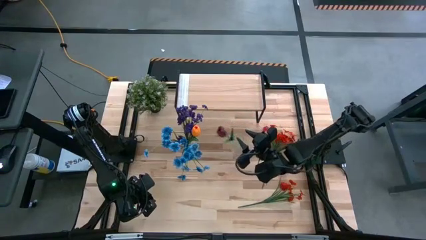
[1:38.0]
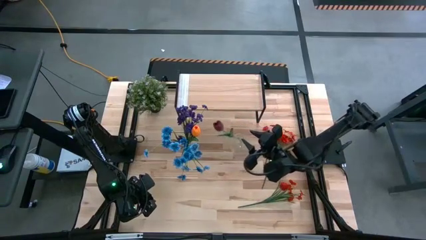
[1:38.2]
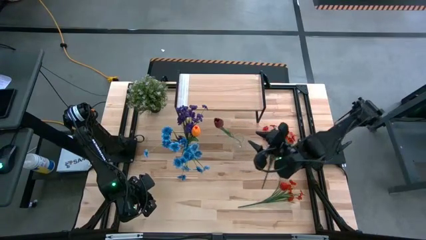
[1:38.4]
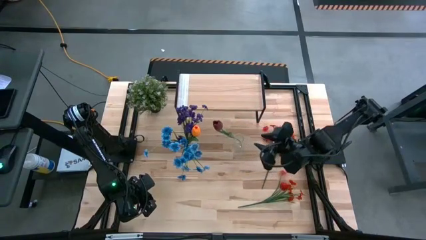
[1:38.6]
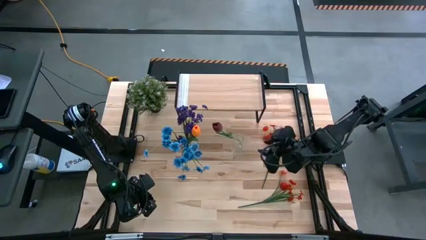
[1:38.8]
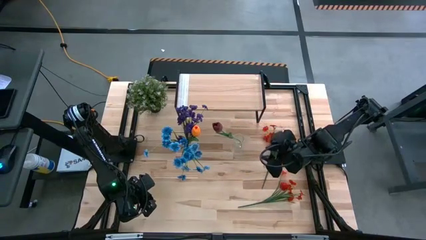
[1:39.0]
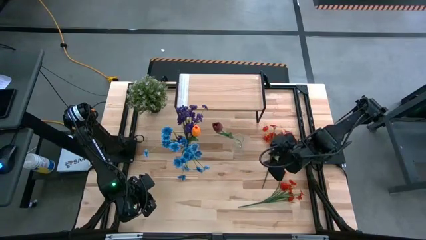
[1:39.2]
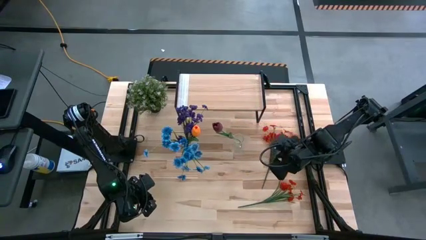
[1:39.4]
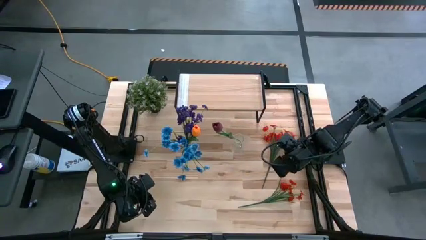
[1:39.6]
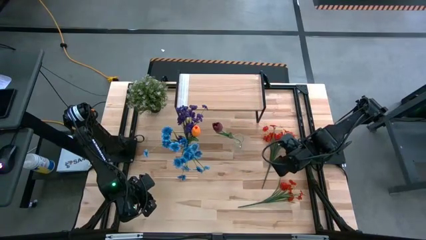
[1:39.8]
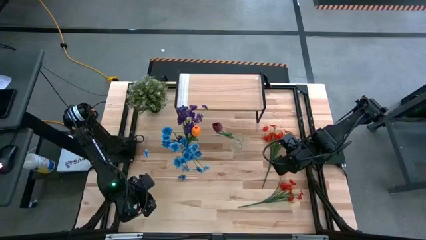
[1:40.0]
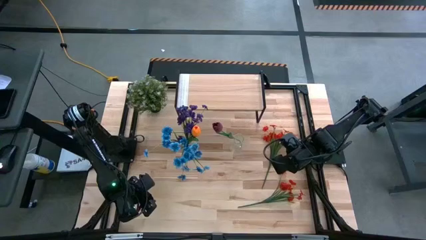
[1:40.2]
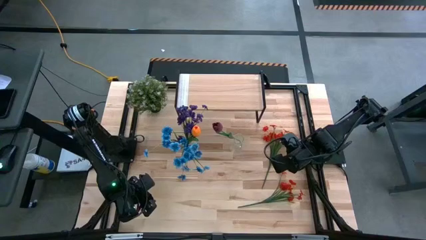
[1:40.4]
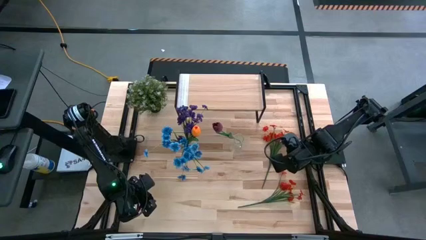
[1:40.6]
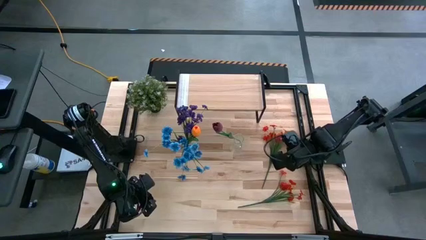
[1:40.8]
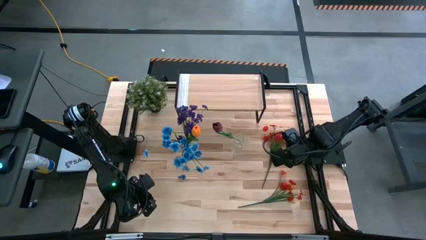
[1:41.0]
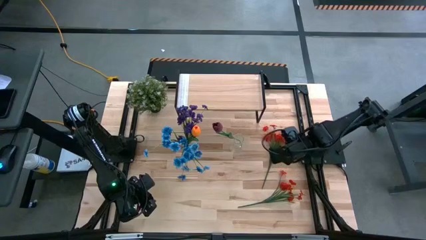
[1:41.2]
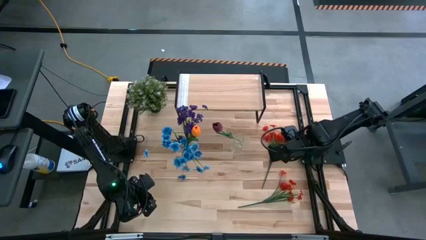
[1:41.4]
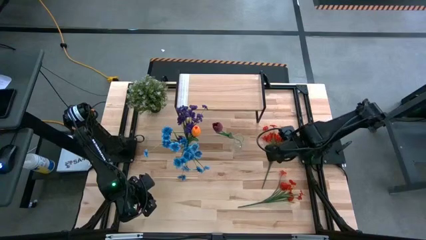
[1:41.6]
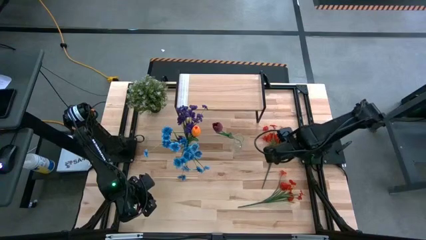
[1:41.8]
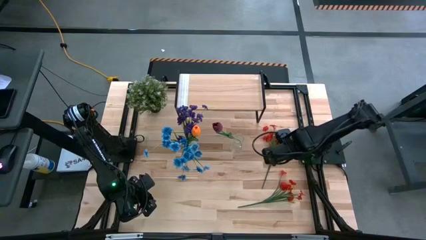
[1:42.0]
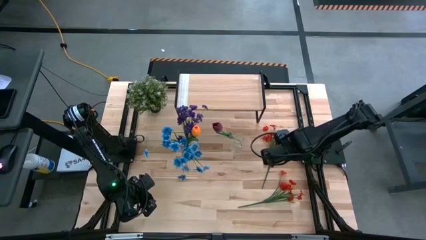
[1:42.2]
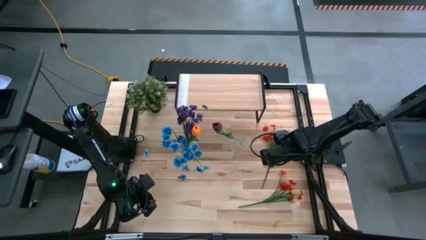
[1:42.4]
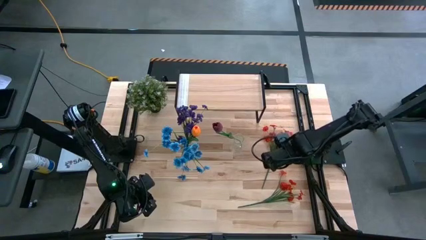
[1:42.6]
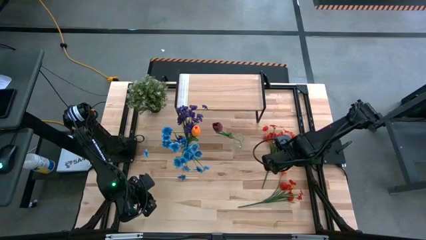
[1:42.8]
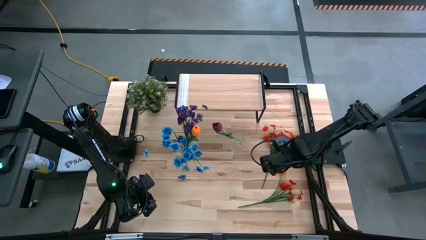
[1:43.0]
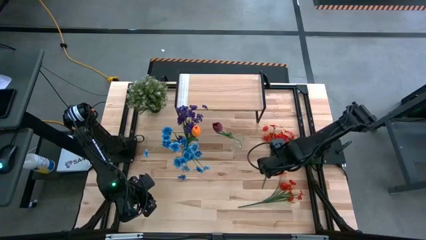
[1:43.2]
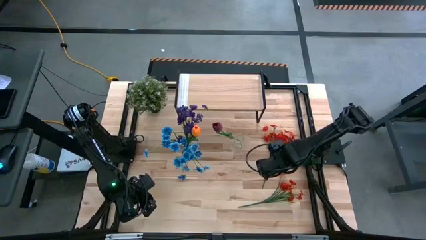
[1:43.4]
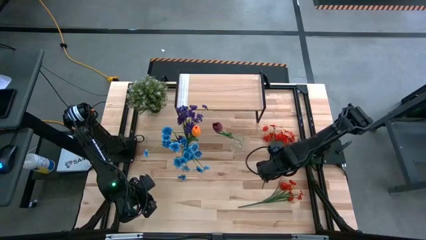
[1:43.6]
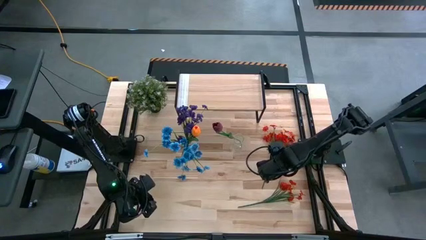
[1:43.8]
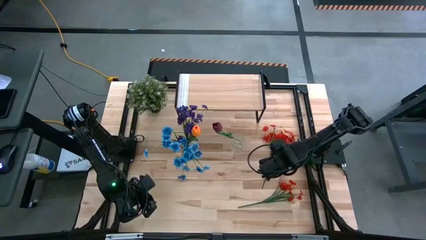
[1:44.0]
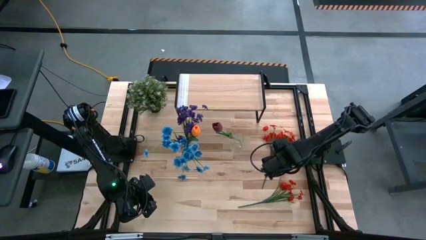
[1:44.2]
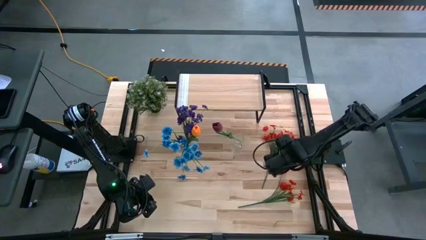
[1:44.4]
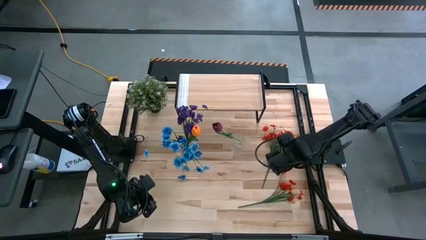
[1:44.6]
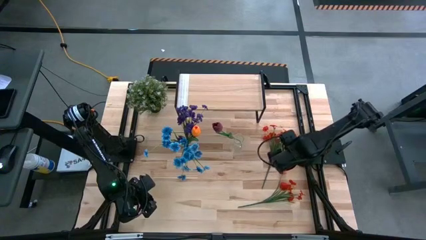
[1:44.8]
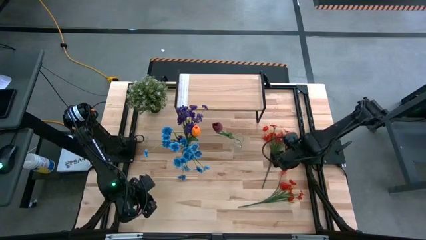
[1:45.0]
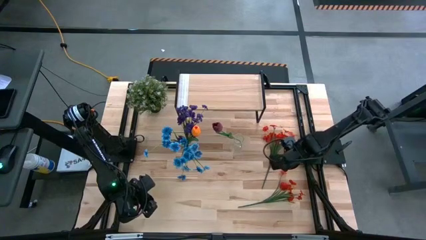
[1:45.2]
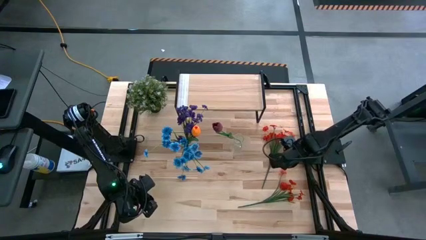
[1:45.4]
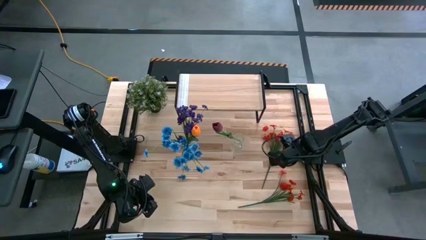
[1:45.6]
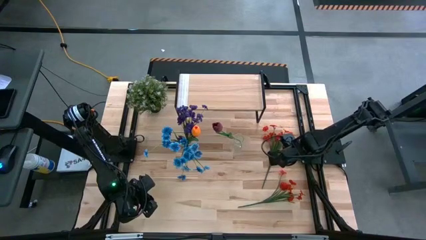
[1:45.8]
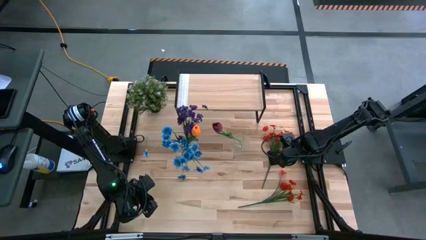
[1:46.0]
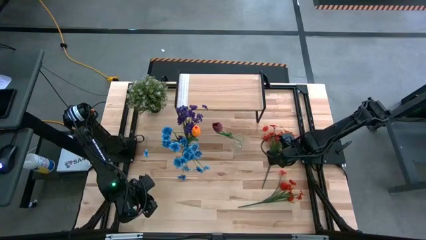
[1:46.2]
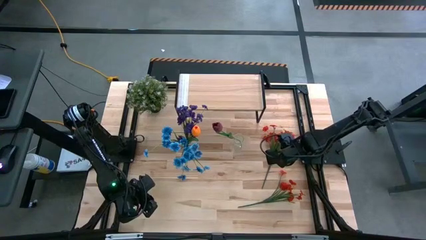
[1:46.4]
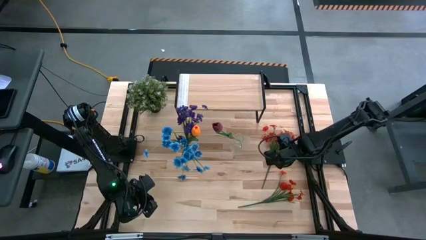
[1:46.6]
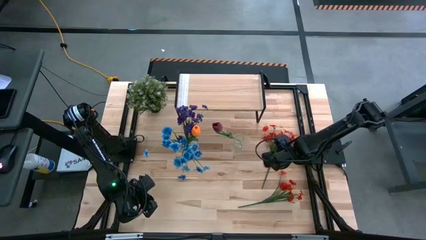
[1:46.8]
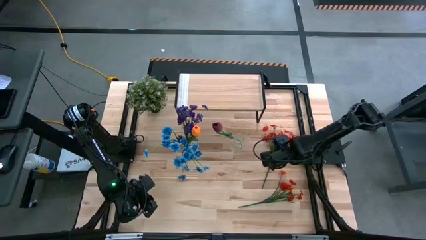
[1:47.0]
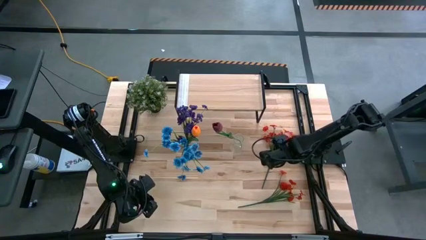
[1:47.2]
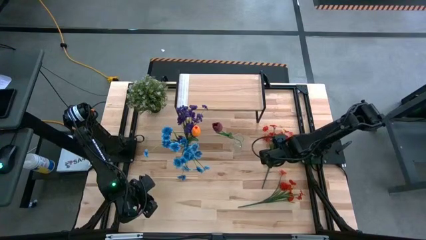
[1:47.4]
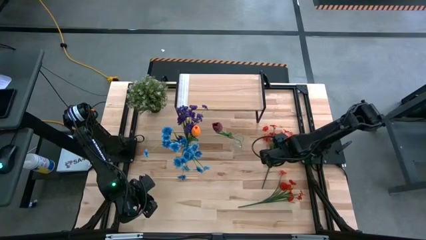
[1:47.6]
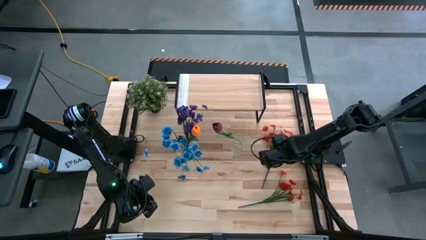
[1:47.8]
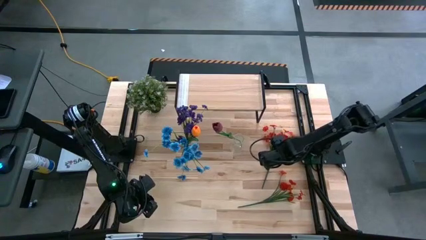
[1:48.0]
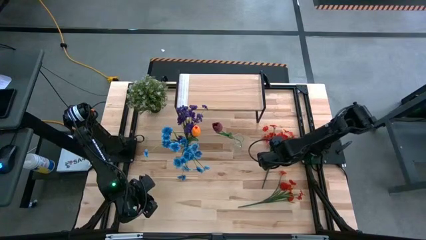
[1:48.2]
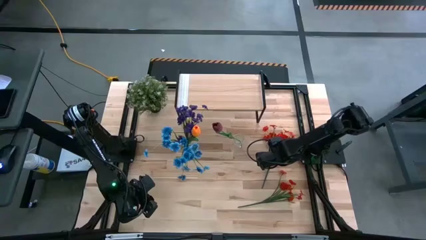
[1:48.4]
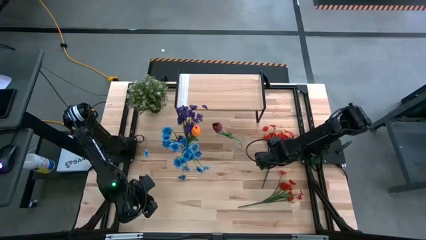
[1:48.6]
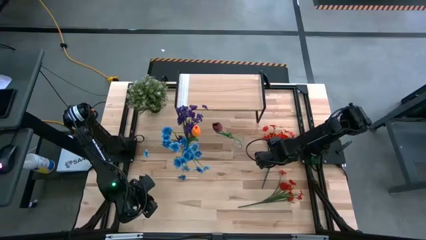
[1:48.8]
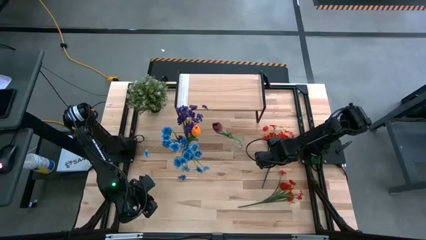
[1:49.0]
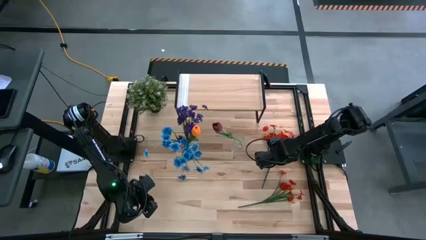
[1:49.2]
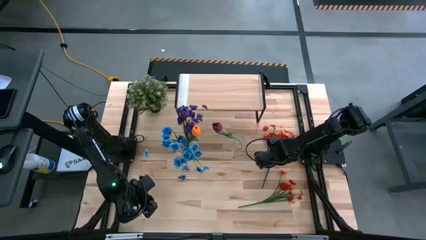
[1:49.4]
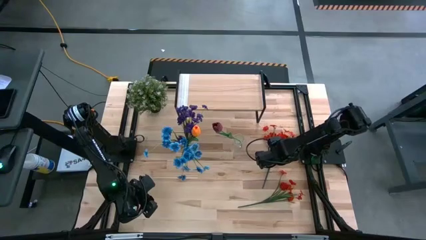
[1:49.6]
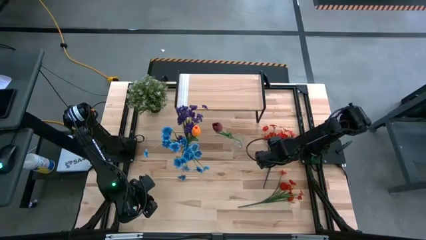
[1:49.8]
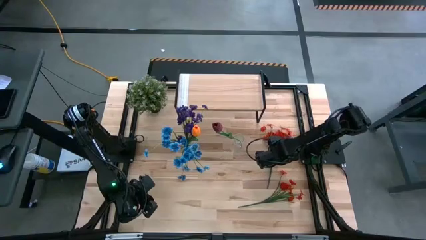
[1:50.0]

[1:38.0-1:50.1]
Task: Pick and place flowers into a vace then onto a shelf
Put the top orange flowers into the right transparent vase
